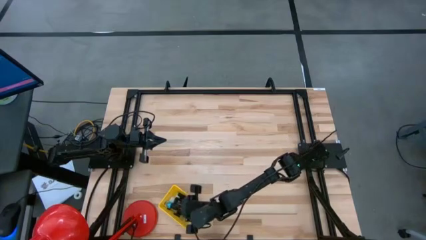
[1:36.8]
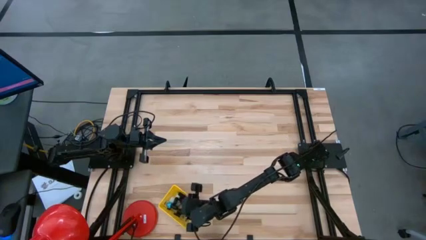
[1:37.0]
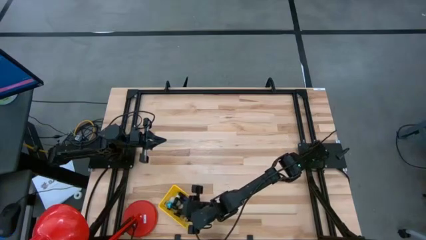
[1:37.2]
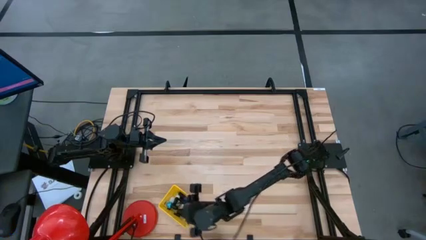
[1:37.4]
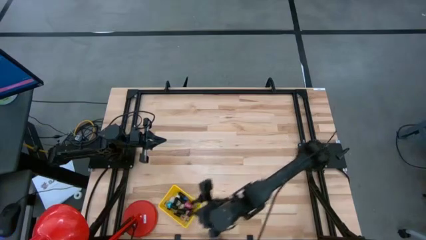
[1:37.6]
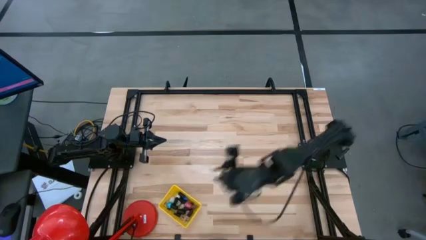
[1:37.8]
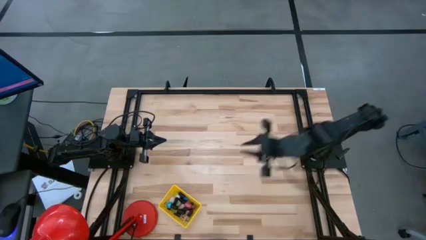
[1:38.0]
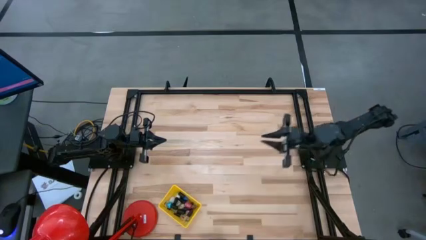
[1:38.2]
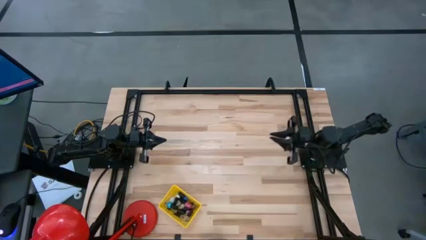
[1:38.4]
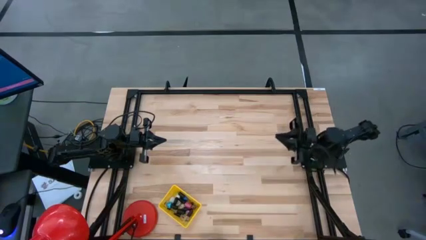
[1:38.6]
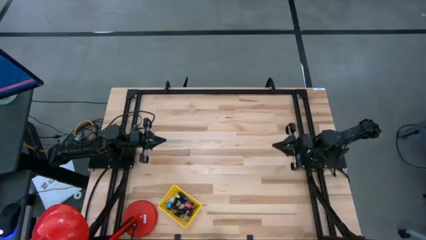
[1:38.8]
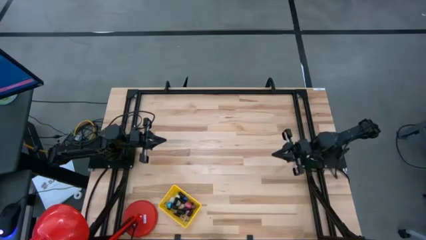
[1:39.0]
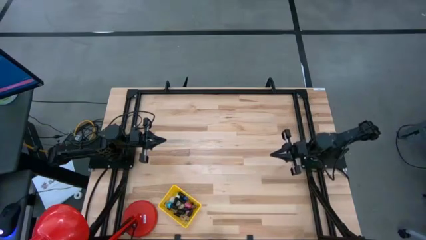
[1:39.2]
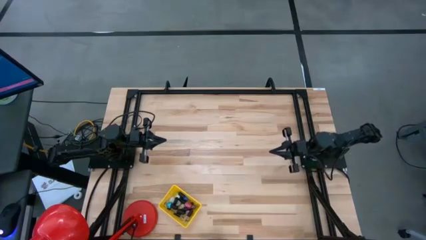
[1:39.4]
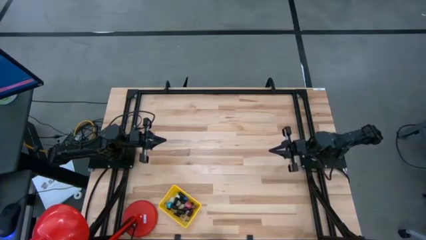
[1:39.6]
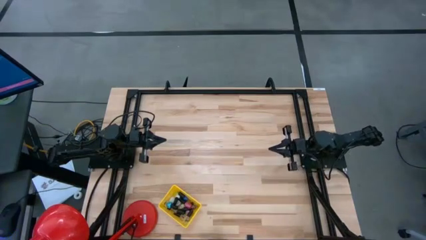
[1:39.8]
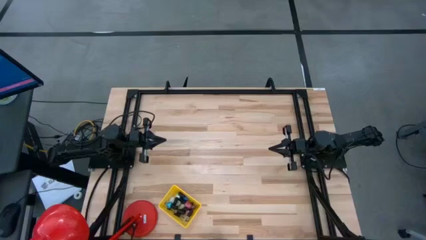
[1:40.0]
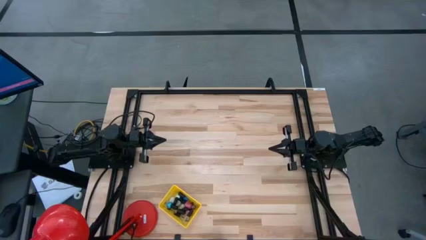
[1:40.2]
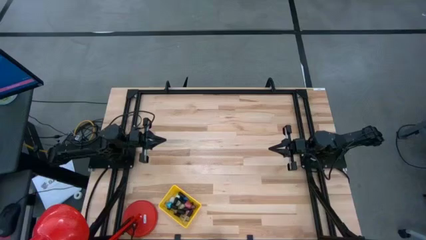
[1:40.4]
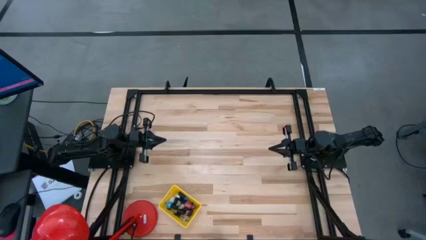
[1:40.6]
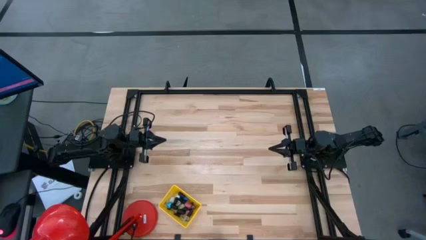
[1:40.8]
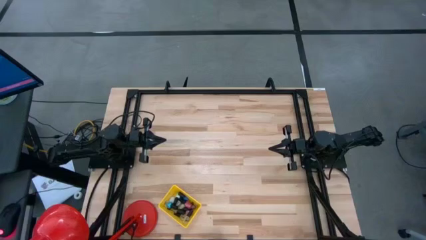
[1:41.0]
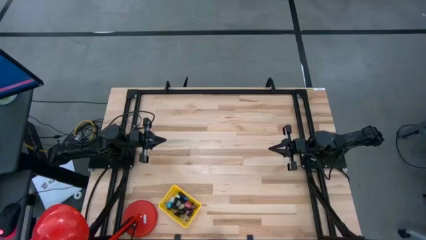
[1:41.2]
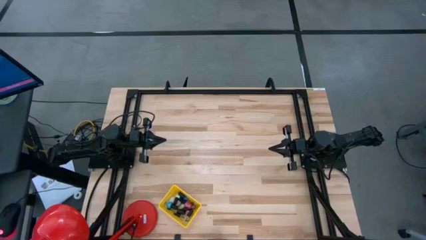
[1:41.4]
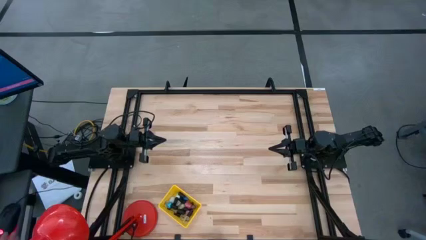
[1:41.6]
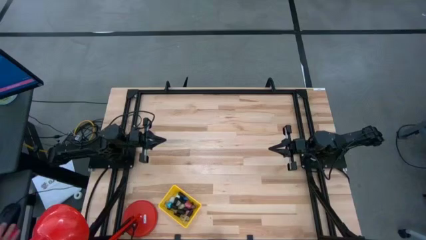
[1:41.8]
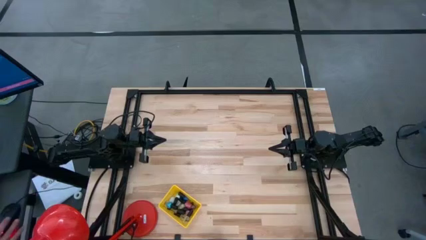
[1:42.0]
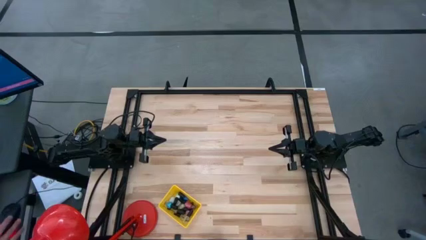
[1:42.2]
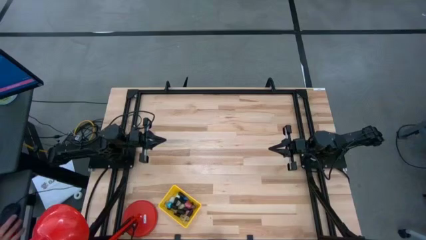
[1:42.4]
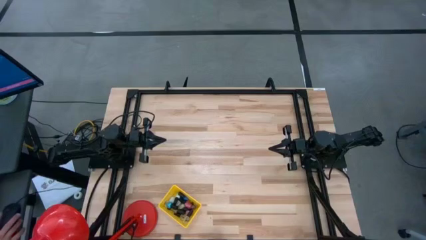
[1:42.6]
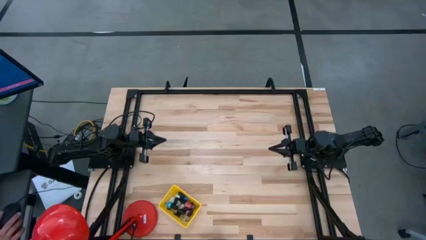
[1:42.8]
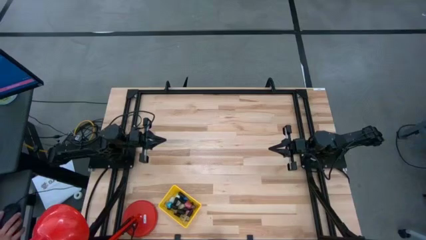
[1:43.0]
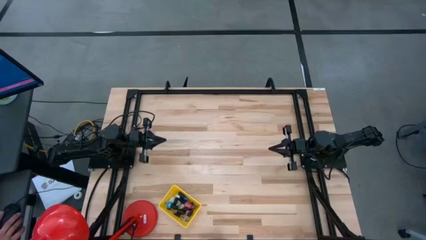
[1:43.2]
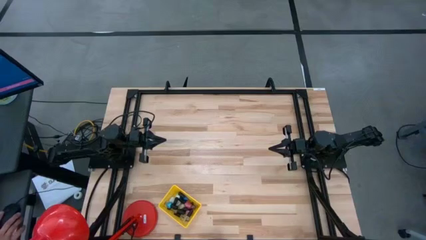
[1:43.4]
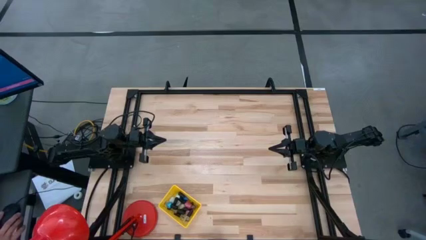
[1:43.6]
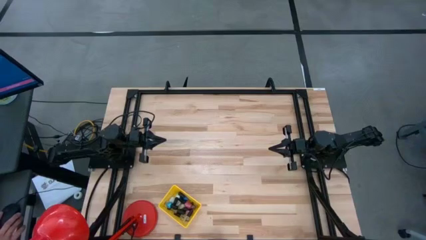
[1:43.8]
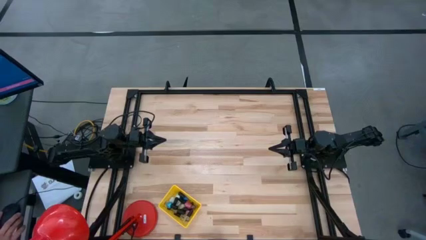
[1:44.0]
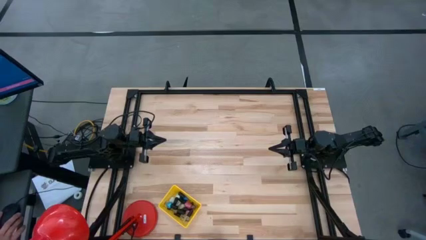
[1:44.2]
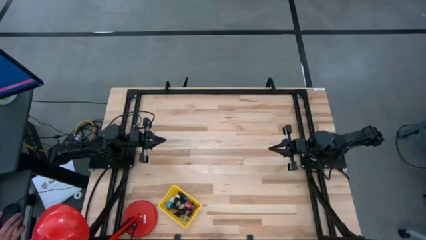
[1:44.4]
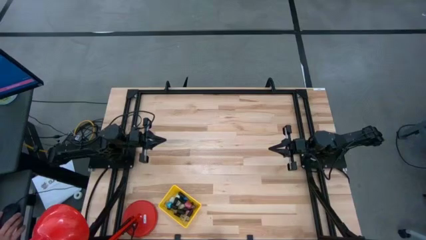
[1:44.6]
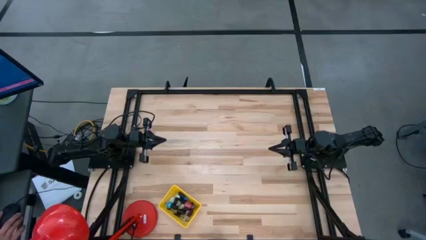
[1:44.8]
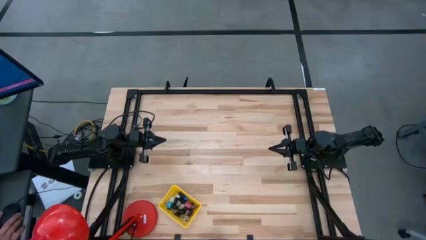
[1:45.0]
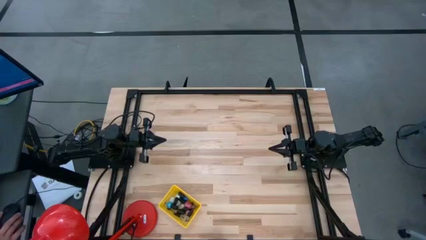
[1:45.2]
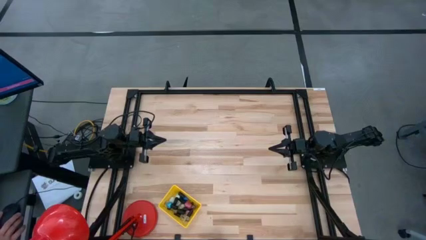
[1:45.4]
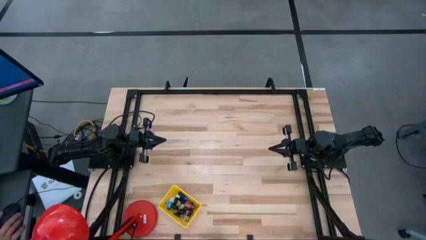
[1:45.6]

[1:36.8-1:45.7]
Task: Pick & Place Nail Polish
Return to Home Position

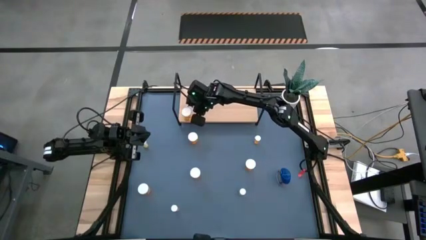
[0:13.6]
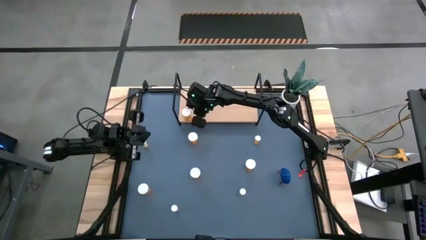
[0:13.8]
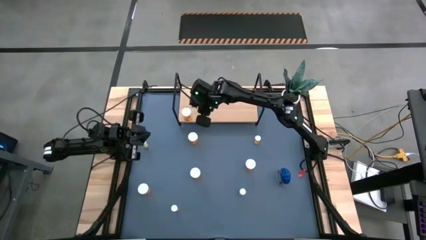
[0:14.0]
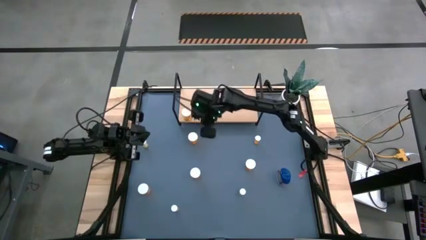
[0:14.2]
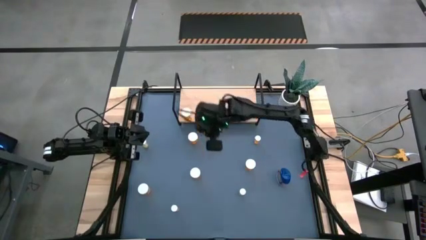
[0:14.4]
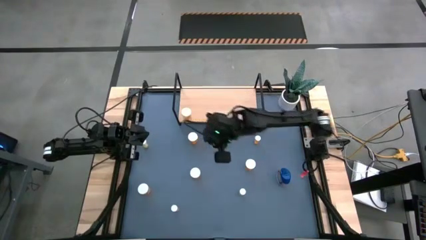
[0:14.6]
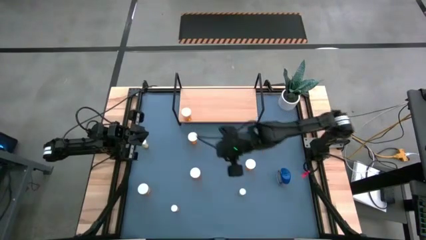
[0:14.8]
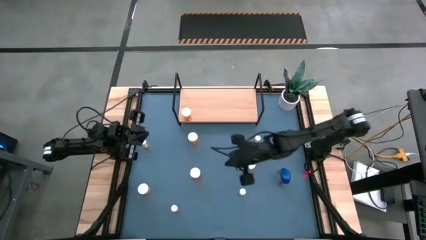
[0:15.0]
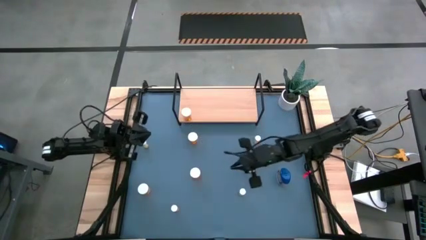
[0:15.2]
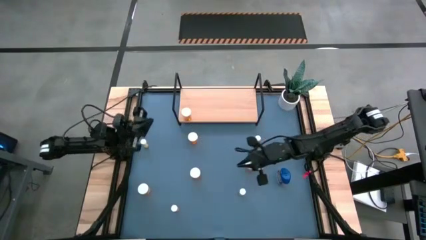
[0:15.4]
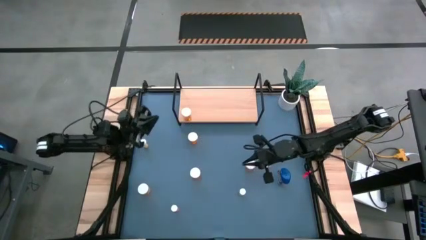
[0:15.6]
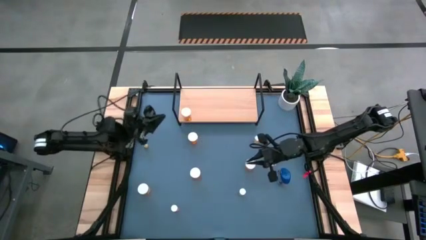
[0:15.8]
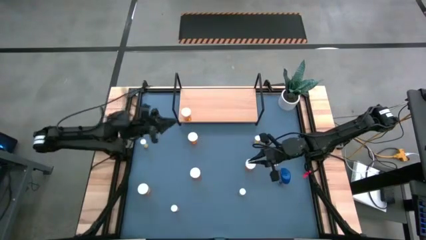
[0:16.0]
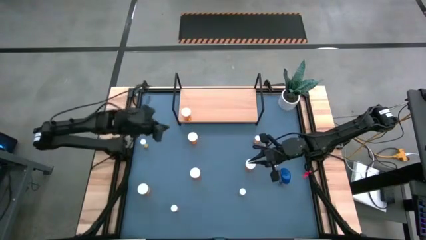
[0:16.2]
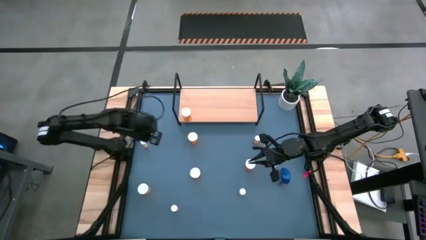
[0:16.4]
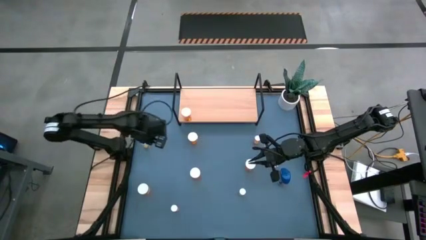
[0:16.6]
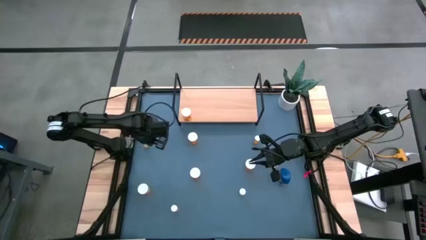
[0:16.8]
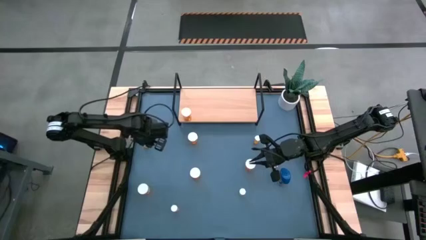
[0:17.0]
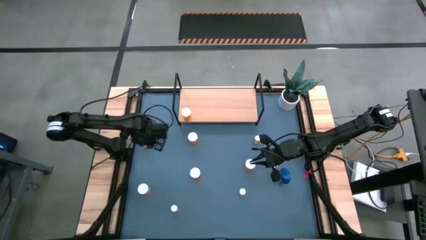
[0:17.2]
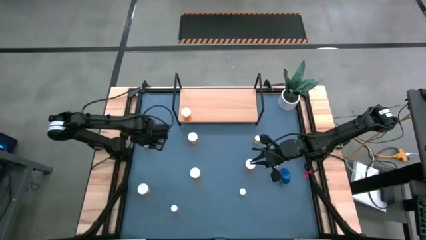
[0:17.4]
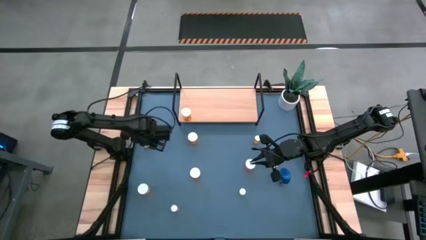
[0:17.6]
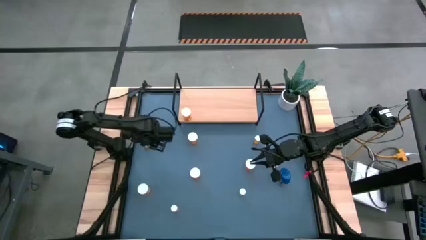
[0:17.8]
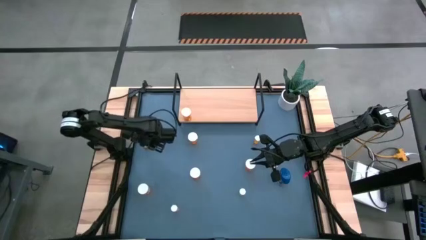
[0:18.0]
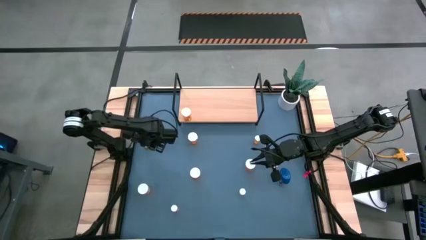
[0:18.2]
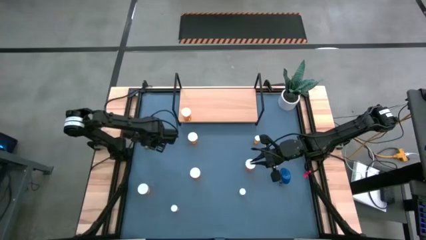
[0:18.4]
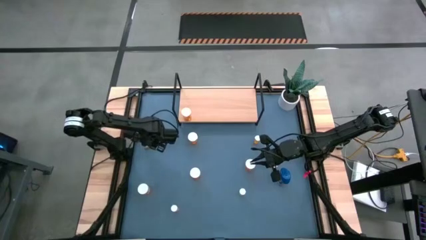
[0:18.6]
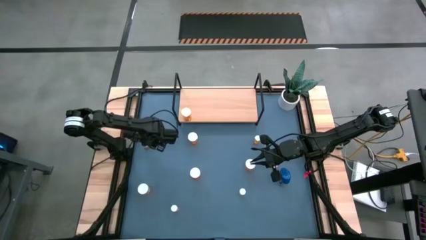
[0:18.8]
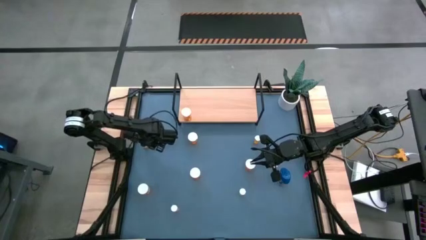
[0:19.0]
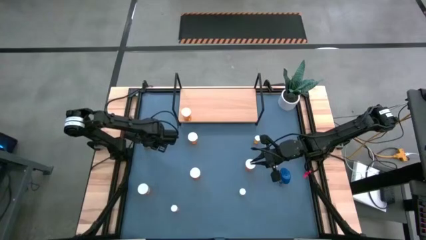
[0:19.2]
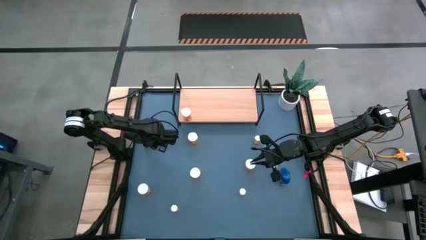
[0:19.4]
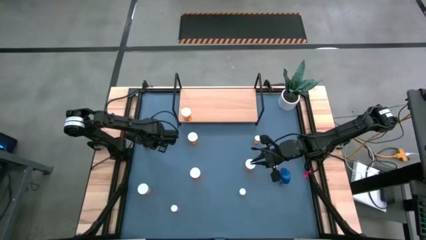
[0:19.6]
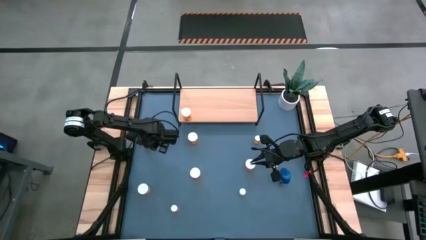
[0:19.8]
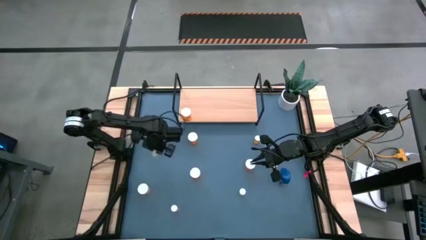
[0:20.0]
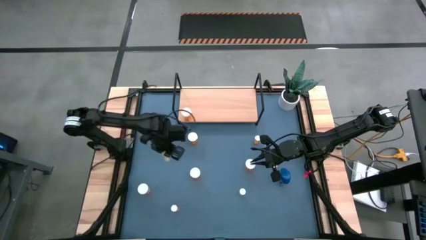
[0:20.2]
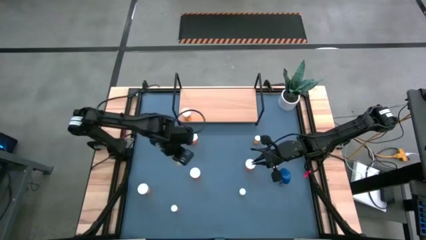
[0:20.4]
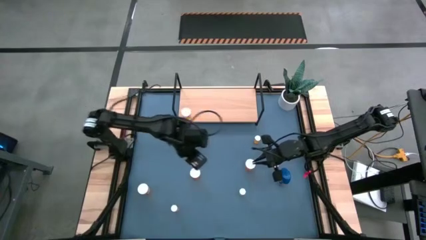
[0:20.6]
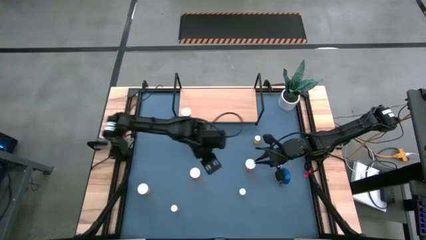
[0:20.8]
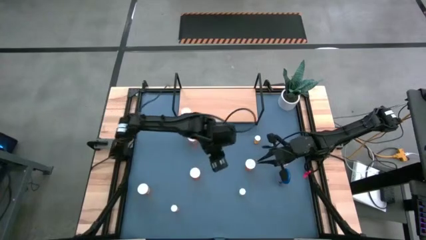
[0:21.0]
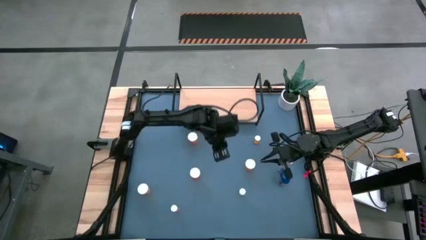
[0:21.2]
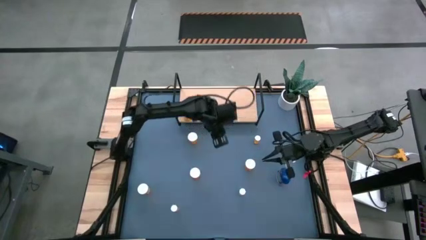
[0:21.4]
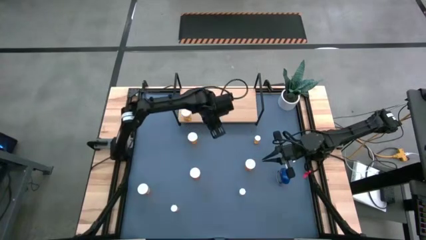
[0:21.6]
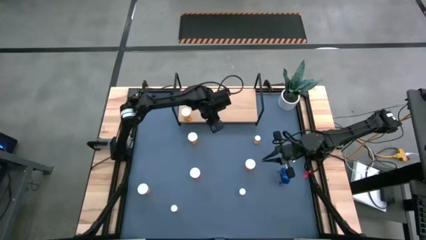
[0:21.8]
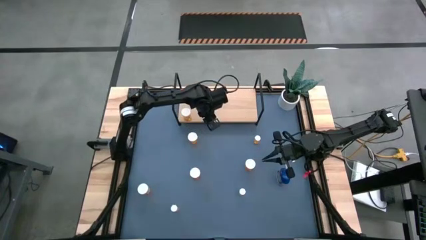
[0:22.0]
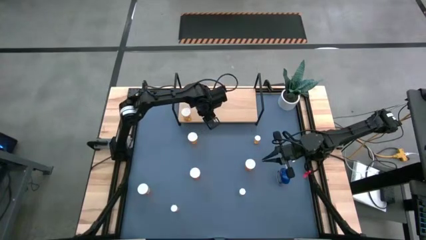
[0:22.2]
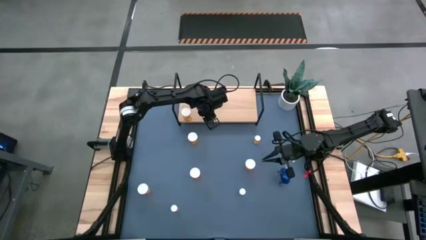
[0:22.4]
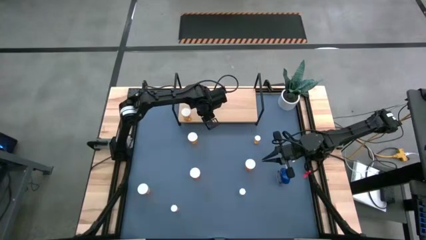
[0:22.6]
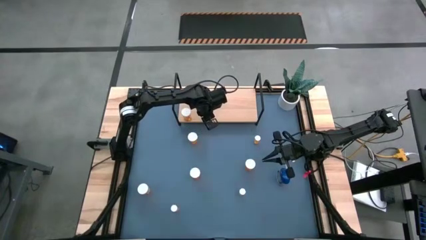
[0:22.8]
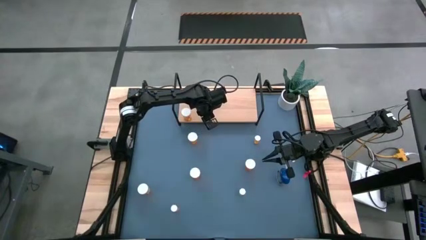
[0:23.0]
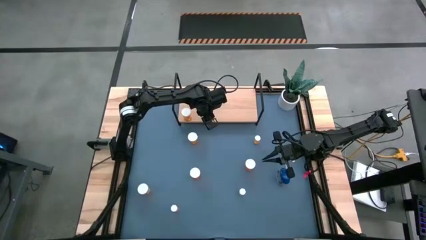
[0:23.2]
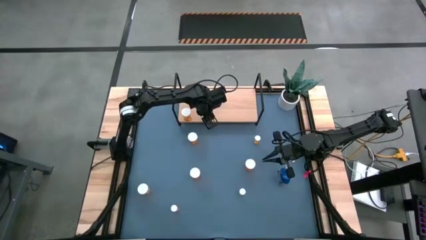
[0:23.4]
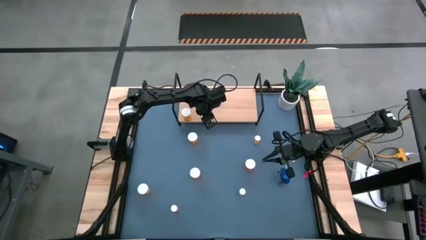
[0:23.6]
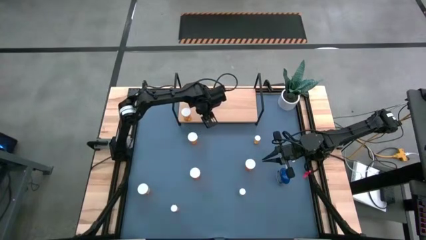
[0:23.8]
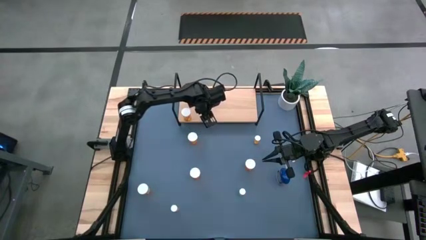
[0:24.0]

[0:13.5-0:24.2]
Task: Pick and place medicine bottles onto shelf by color
Put the top left yellow pill bottle on the shelf
